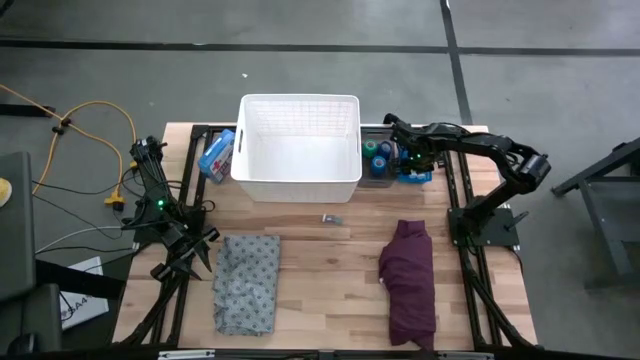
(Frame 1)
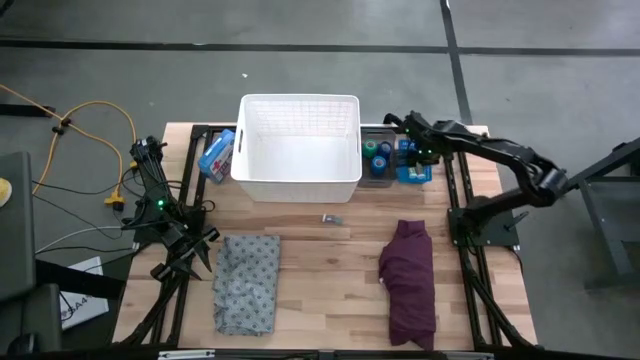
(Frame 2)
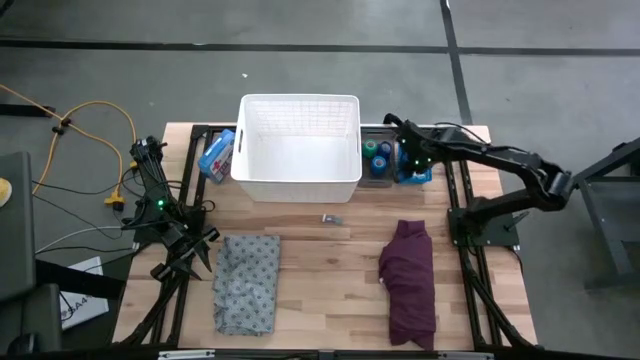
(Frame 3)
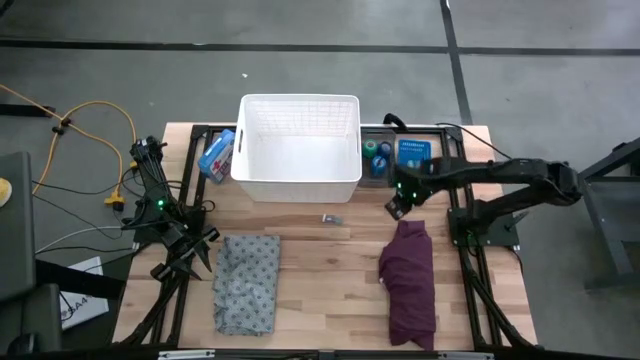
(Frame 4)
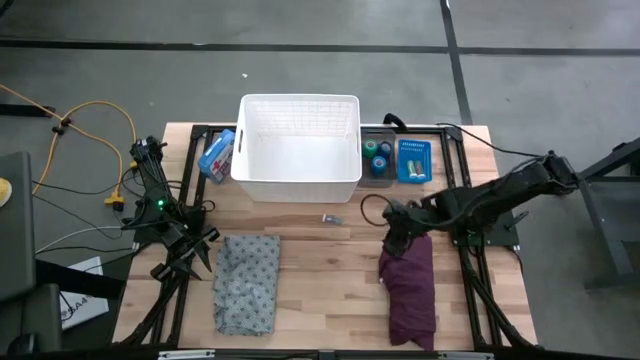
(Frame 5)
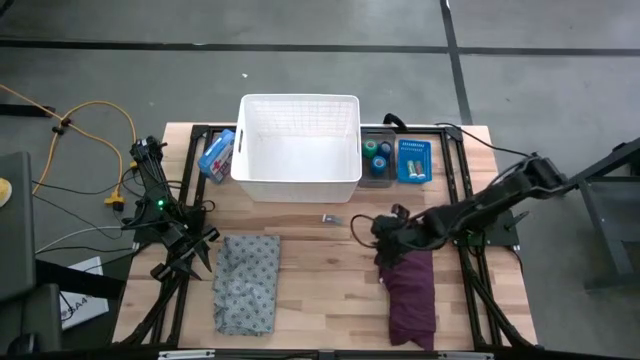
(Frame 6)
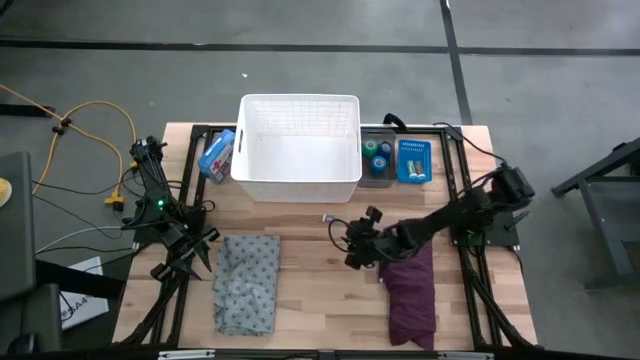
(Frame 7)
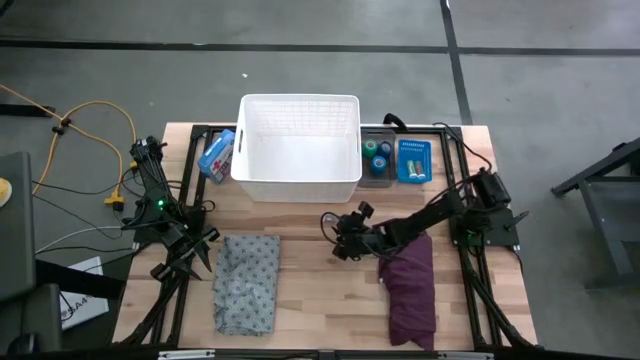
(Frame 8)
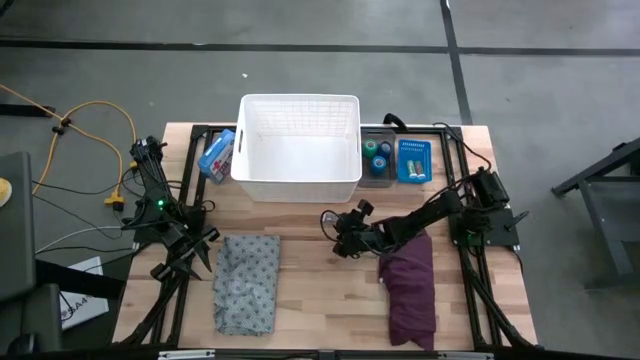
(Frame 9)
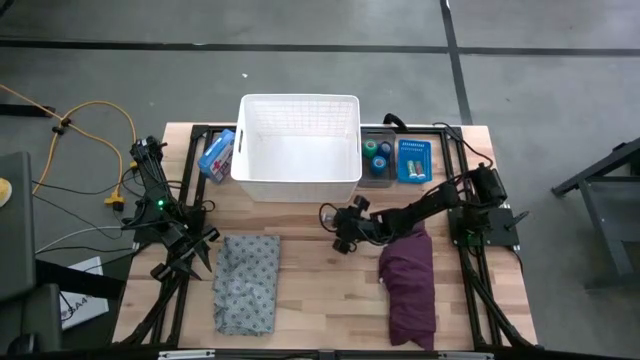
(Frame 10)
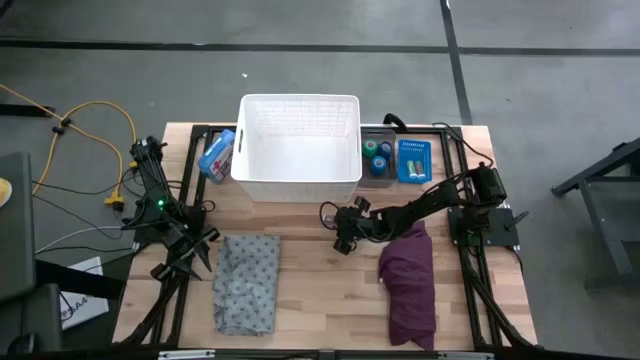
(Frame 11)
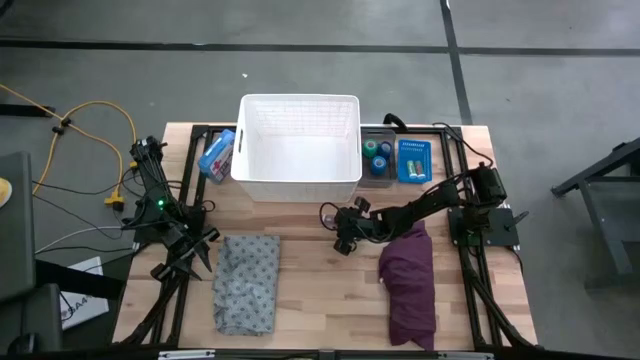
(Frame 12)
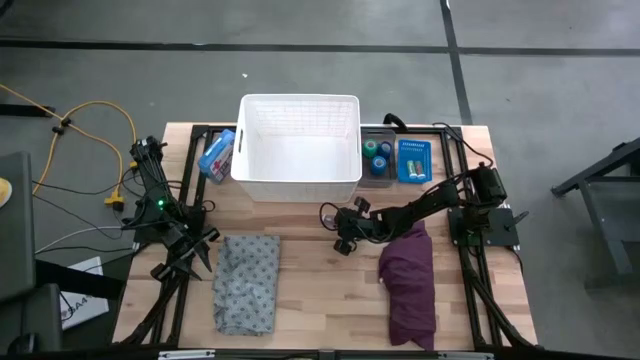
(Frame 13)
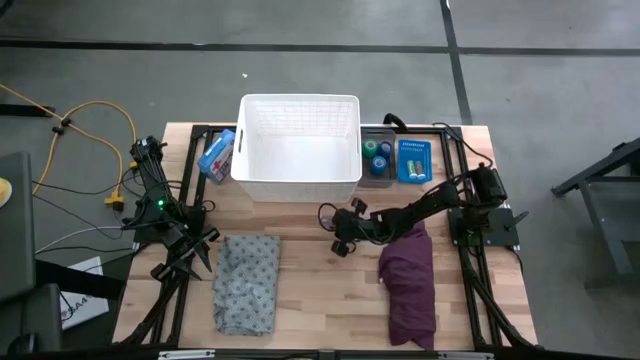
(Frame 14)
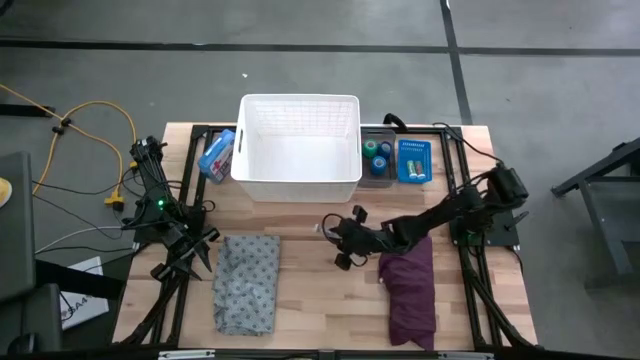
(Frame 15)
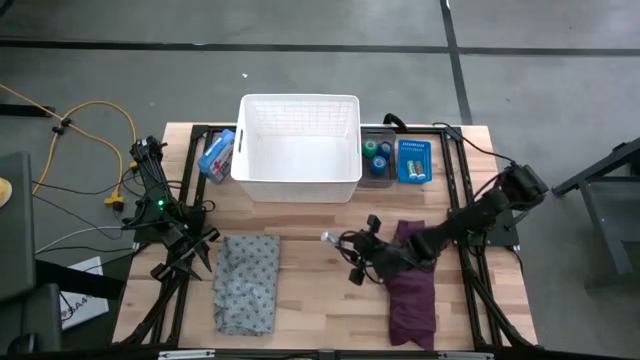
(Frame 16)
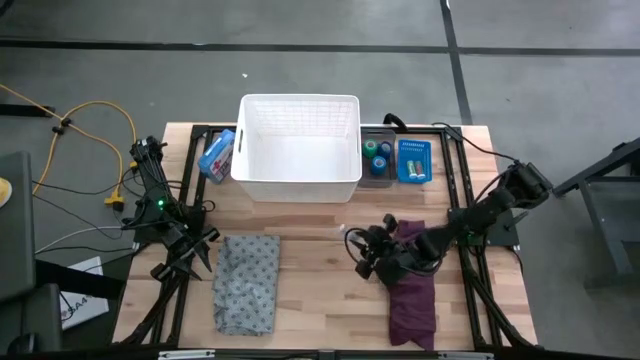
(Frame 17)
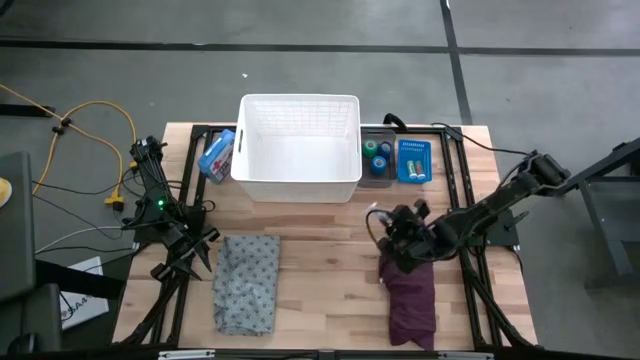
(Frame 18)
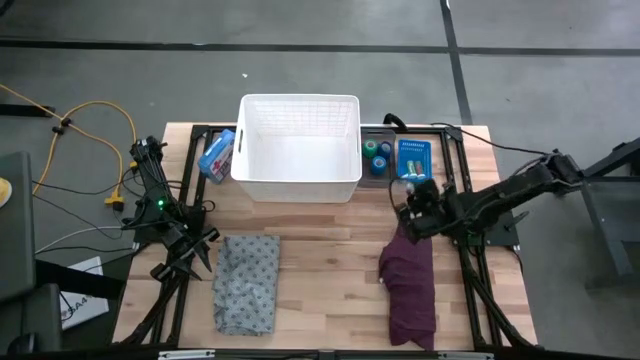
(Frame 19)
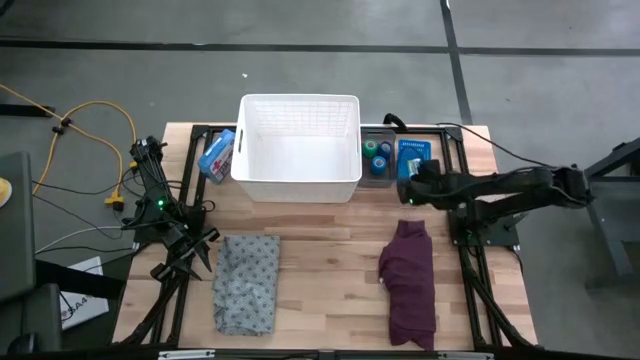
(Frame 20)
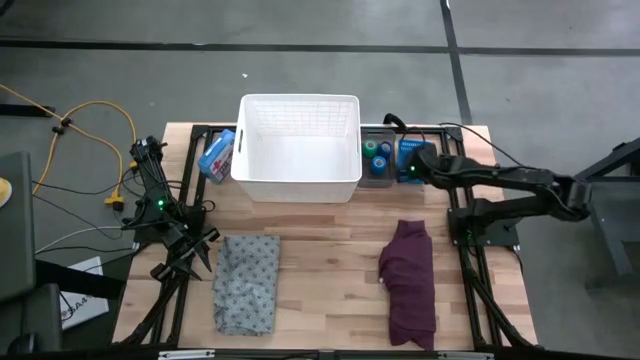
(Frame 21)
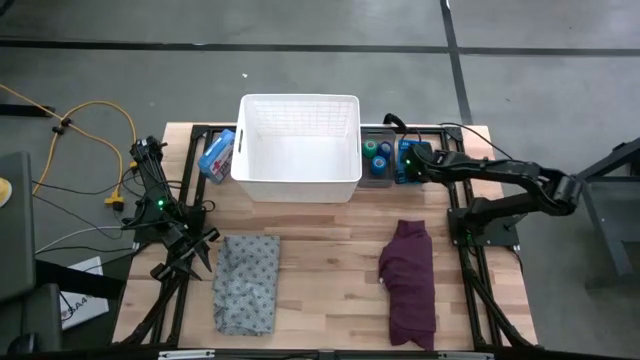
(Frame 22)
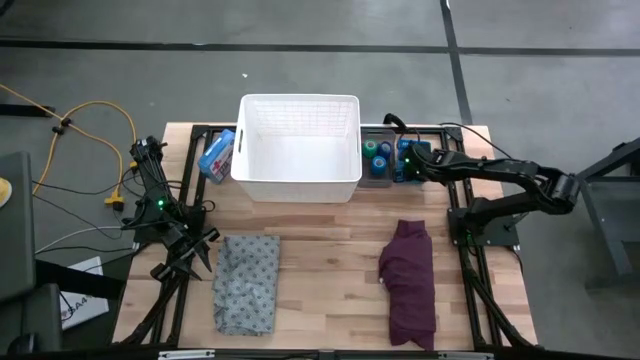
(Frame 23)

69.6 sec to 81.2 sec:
Task: Pick & Place Medicine items
Put the blue pill bottle into the blue bin

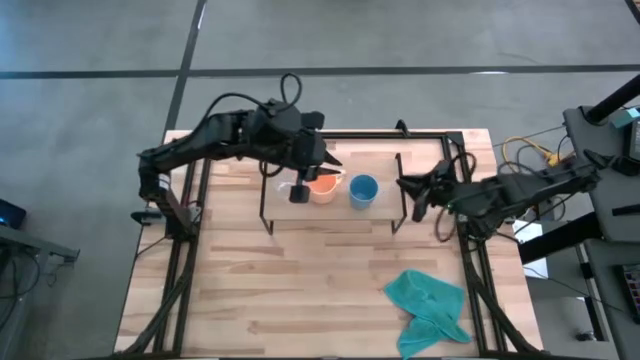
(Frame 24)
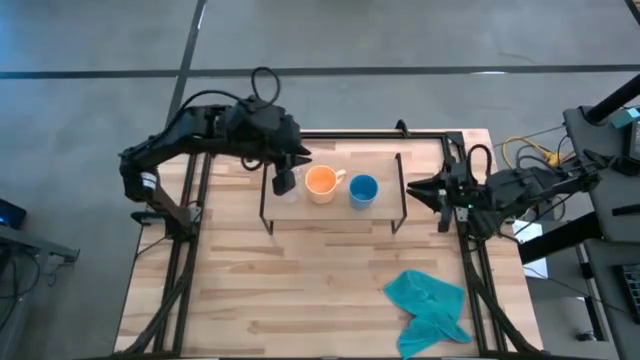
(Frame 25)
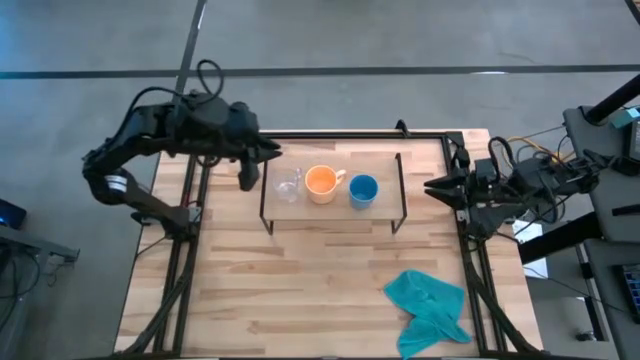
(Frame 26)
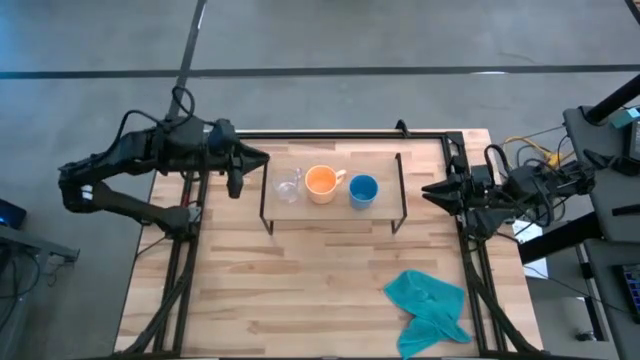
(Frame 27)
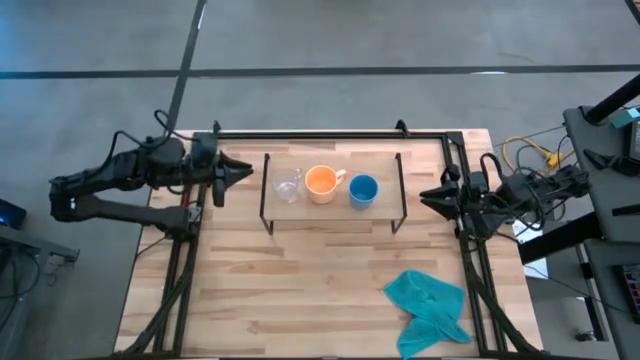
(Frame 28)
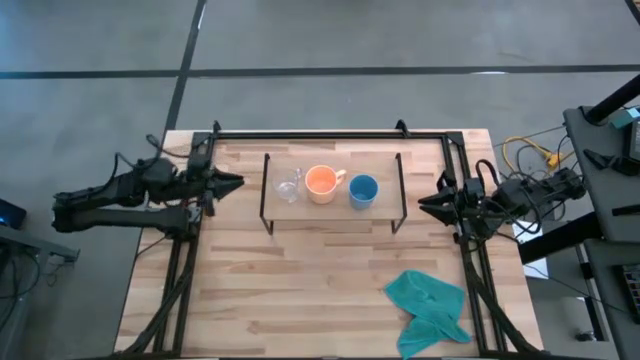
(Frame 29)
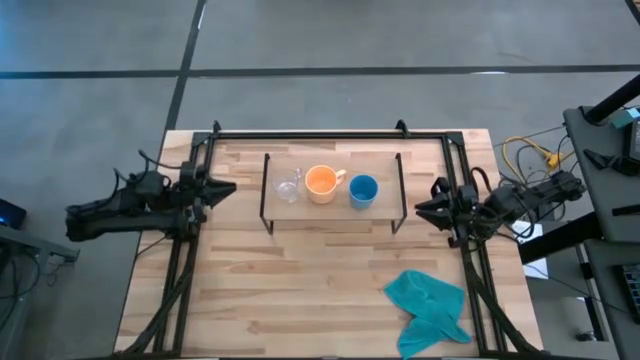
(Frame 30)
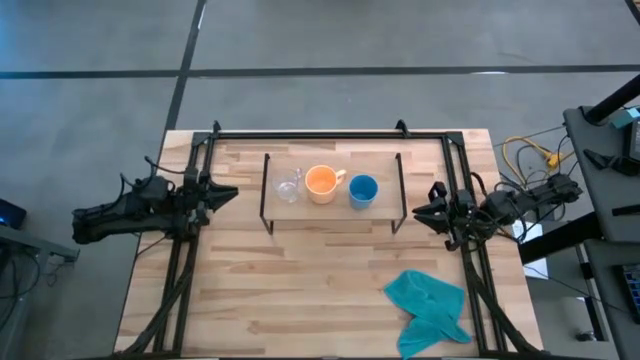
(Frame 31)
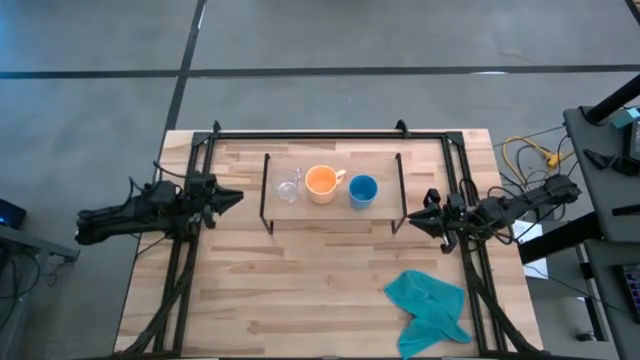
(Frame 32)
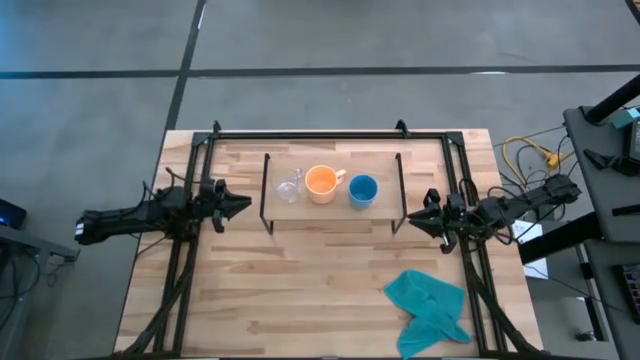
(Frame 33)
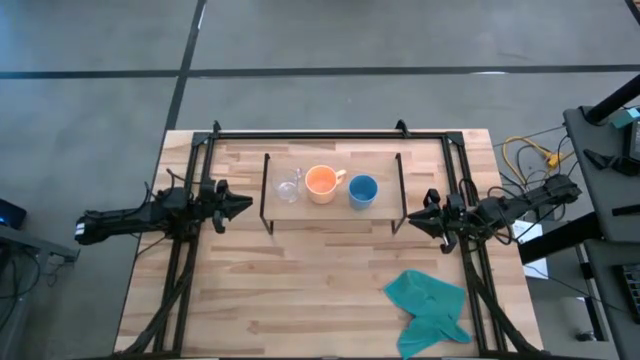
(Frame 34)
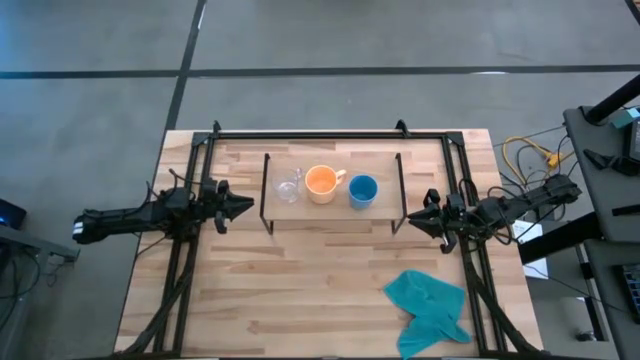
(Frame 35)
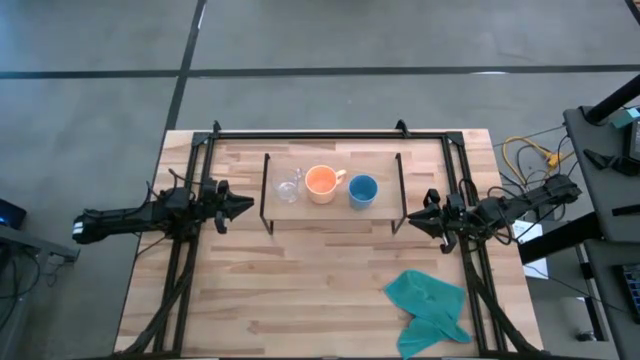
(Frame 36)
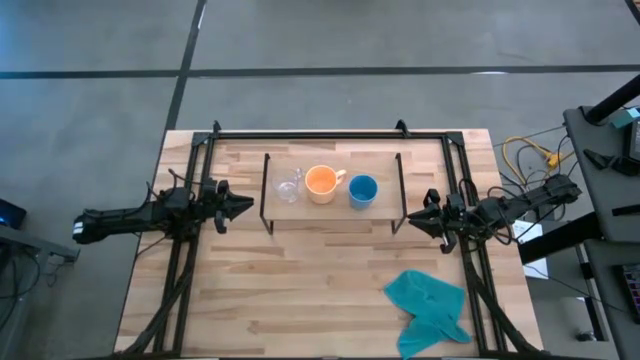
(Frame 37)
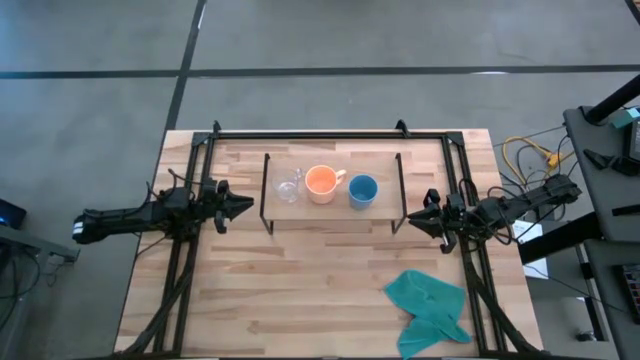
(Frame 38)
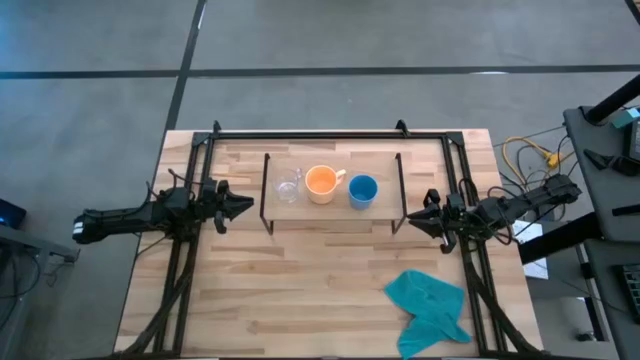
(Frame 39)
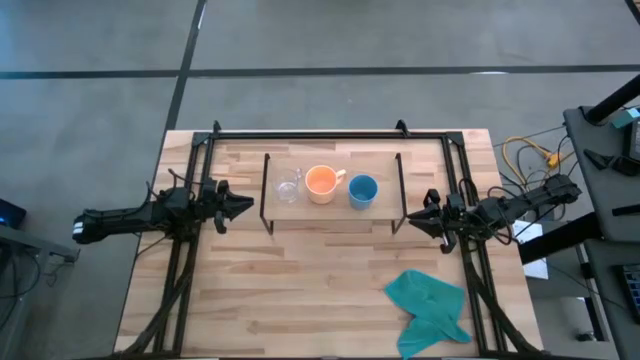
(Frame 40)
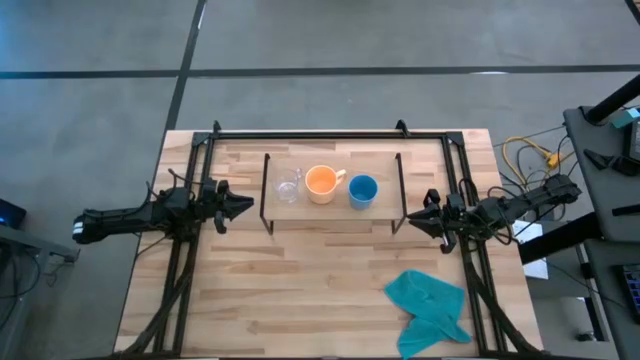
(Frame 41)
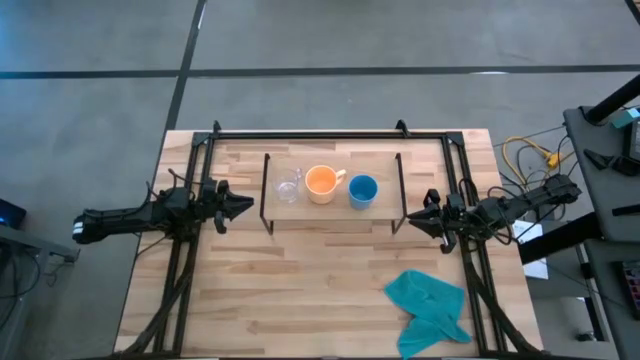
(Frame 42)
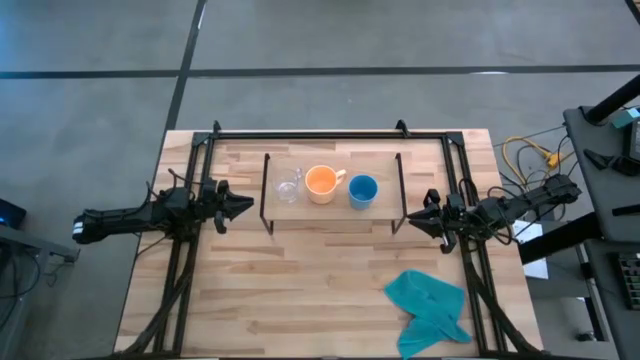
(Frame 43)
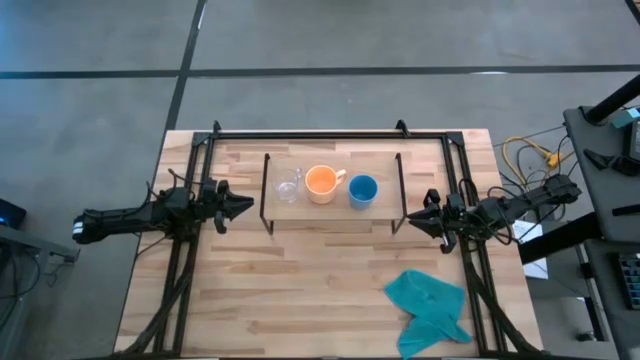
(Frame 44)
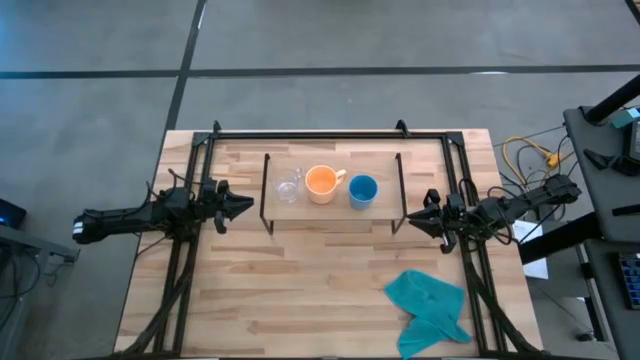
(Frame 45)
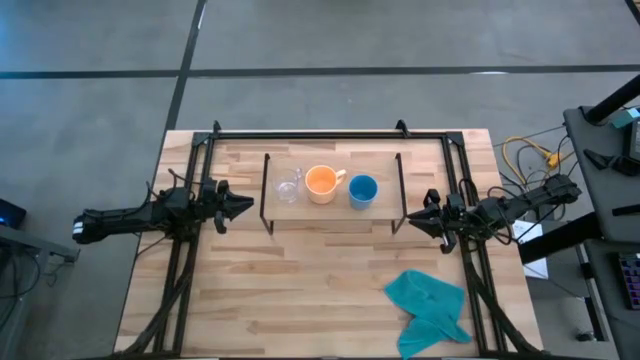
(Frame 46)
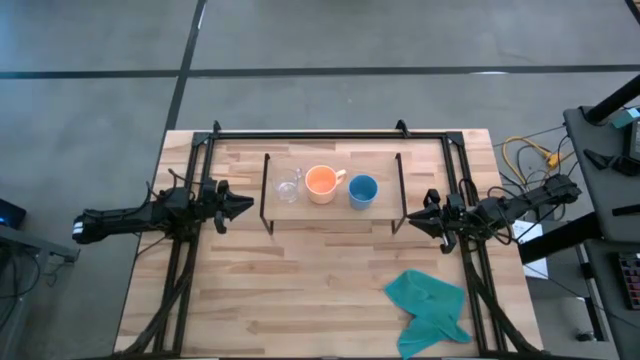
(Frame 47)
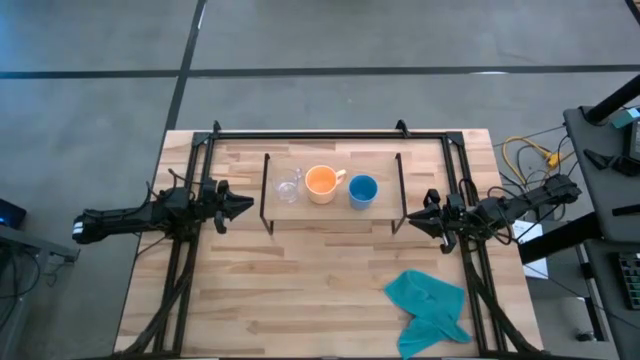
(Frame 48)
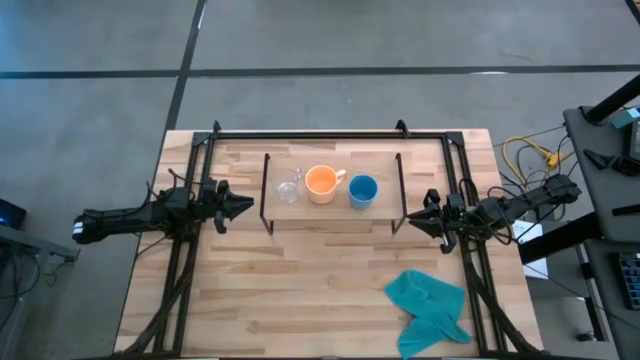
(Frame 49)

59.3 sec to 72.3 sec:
Task: Stack small to large cups/mugs on shelf
Return to Home Position
